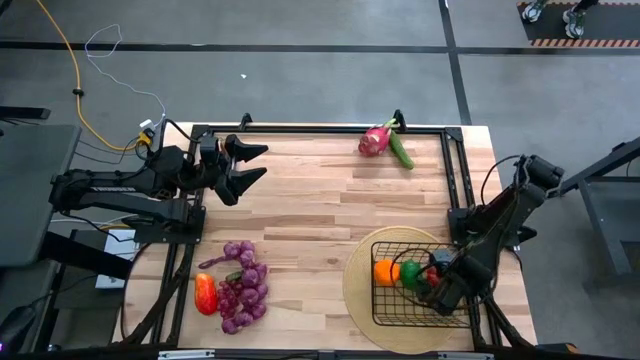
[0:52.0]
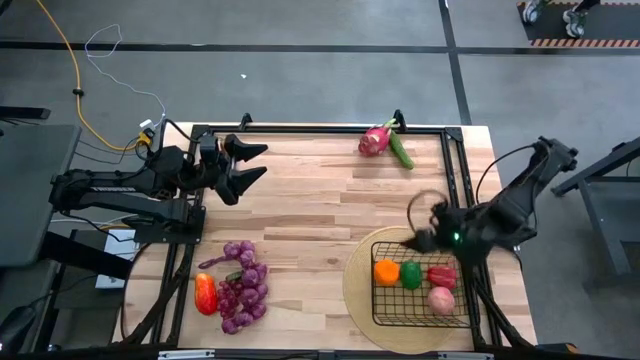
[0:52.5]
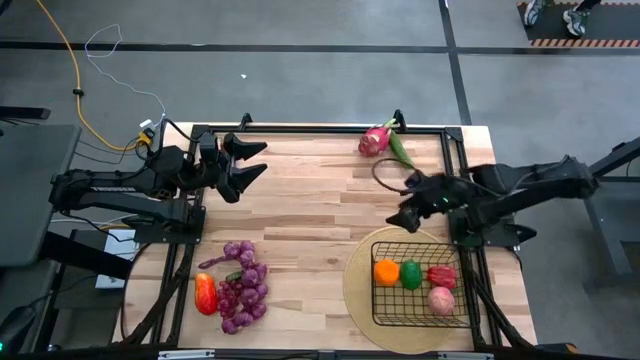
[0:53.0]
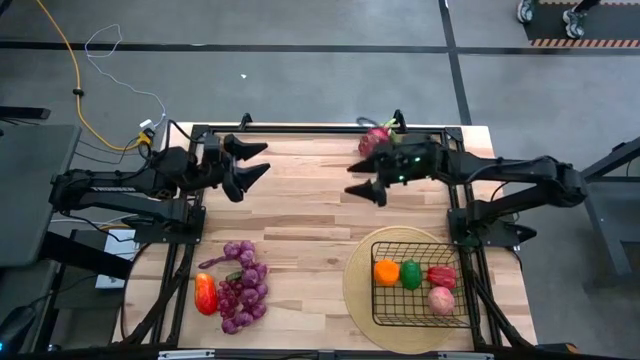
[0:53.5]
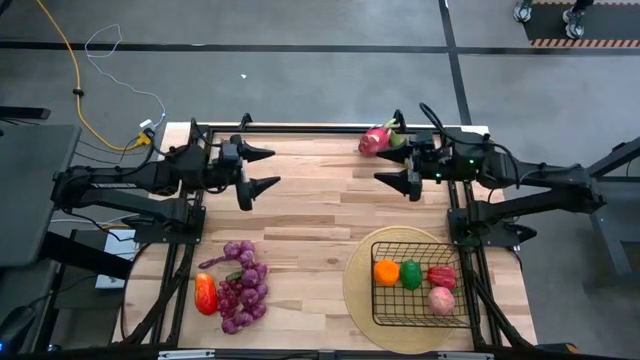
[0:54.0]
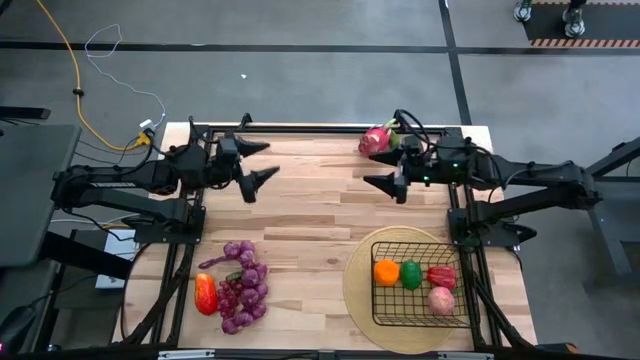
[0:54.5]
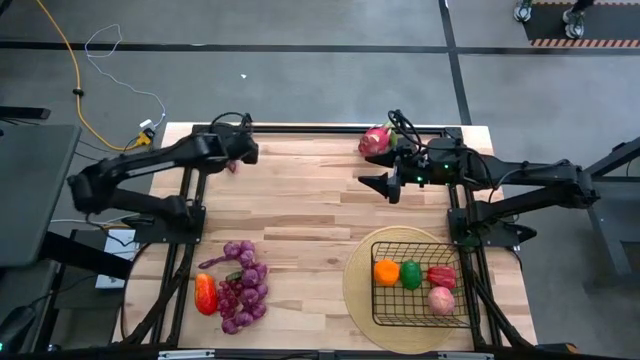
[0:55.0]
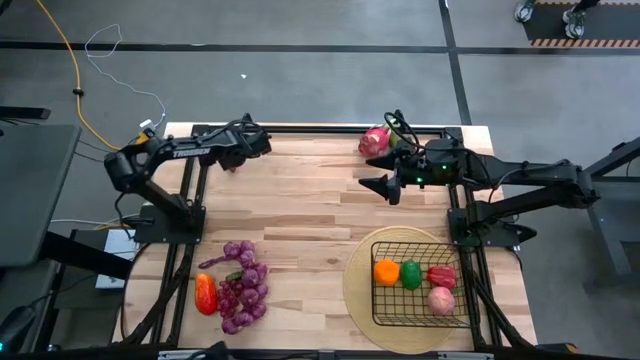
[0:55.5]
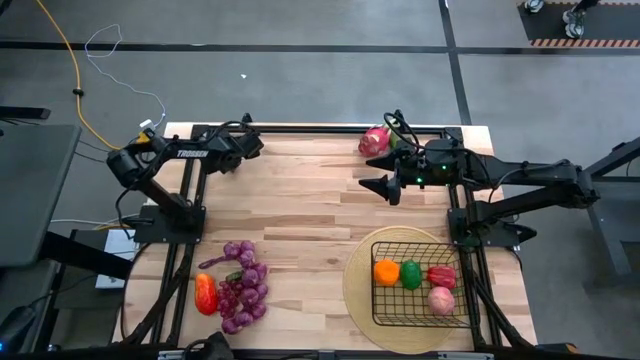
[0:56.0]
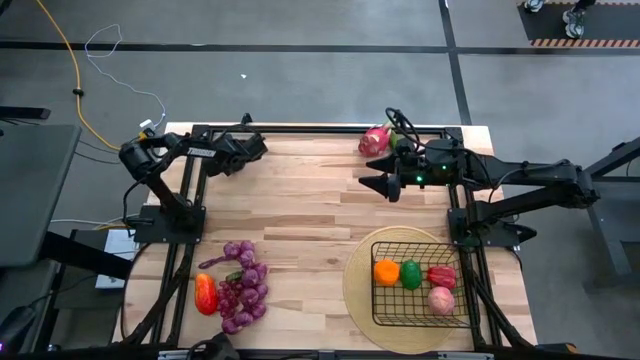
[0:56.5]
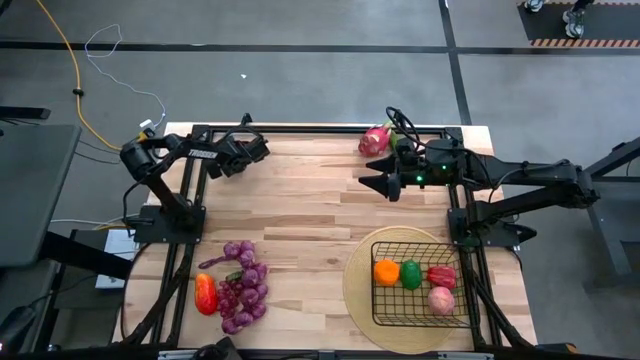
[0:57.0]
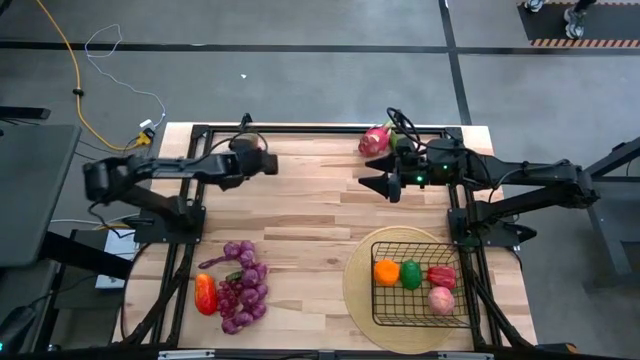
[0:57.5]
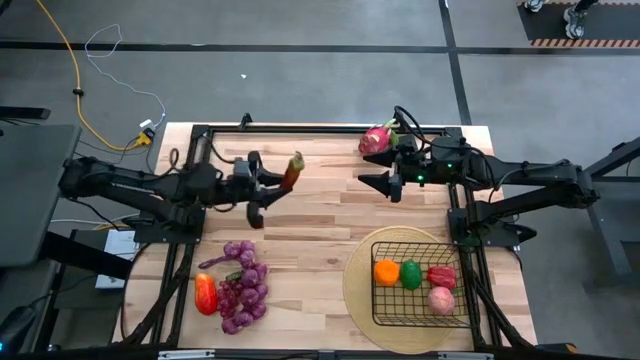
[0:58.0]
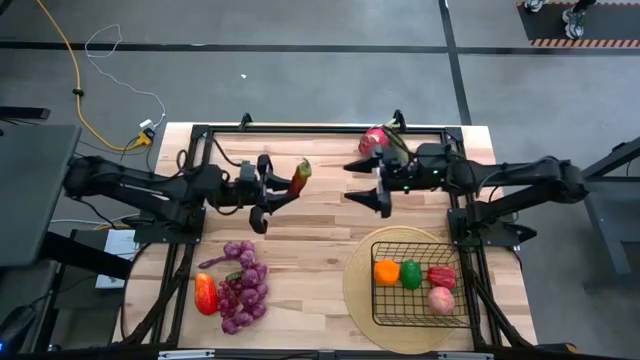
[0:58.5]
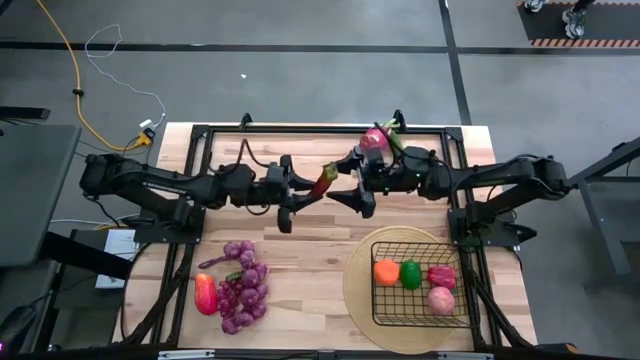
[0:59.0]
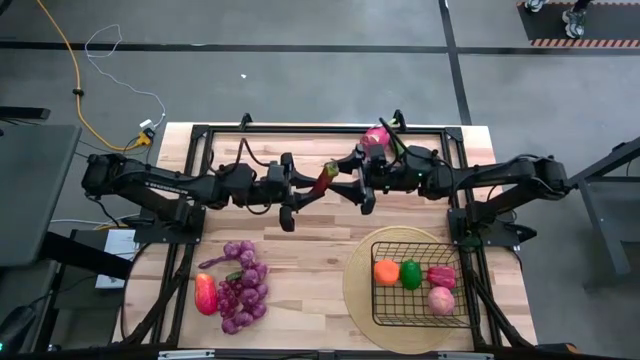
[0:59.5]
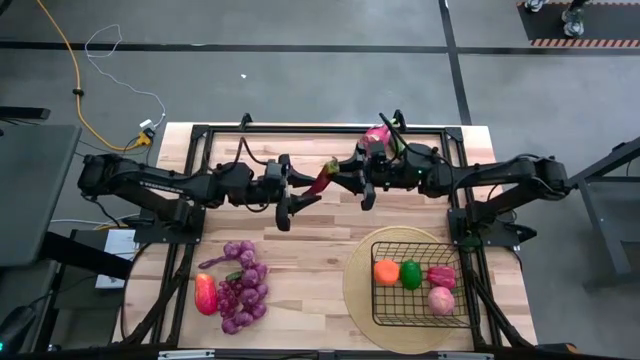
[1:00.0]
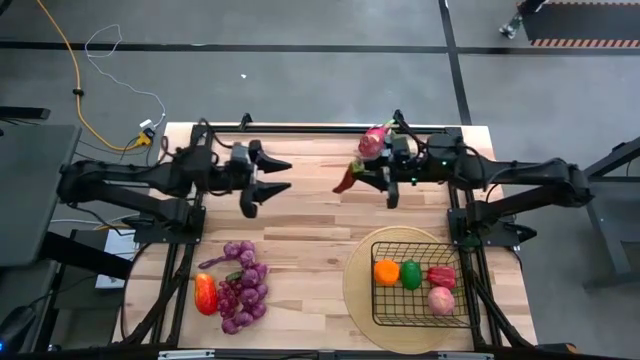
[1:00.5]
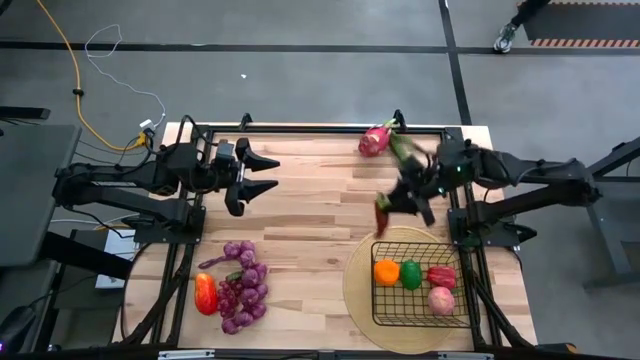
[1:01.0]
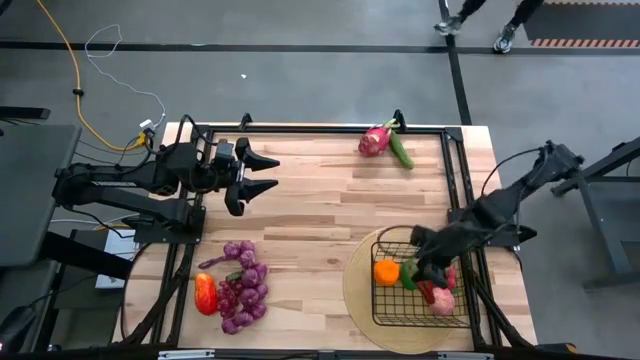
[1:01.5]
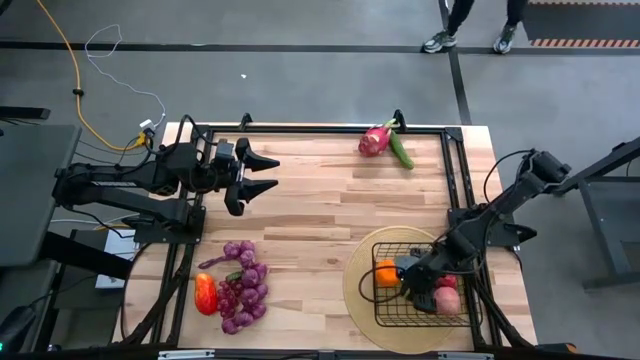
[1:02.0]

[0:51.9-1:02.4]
Task: Build produce basket
Put the chili pepper into the wire basket

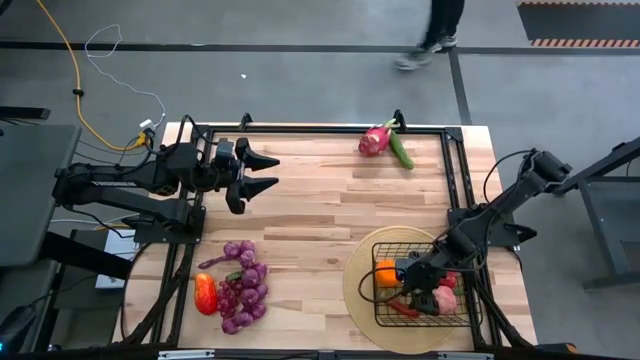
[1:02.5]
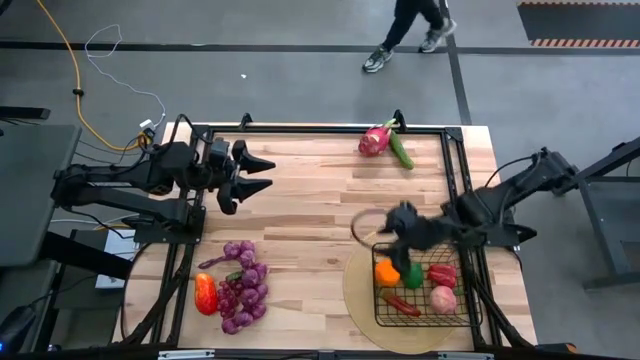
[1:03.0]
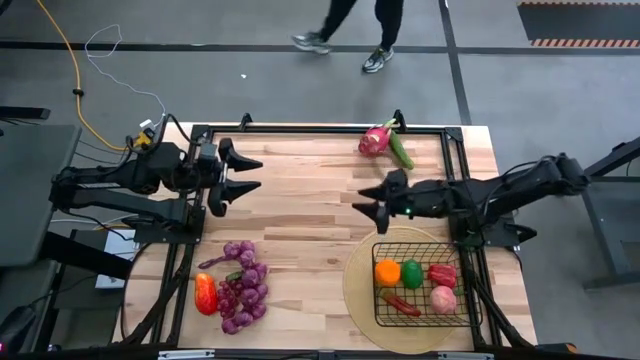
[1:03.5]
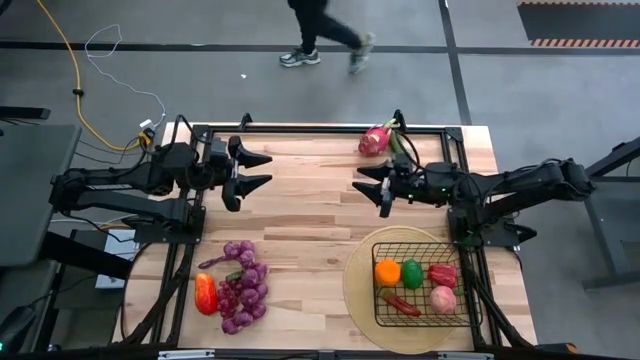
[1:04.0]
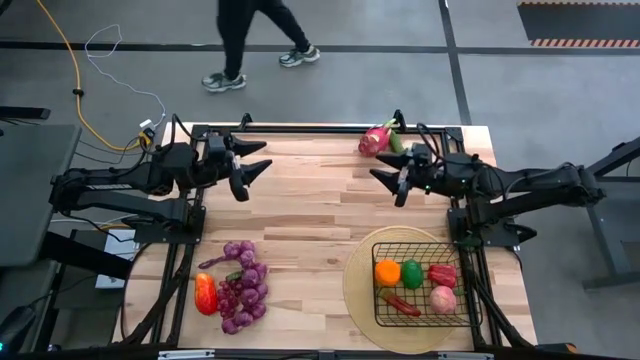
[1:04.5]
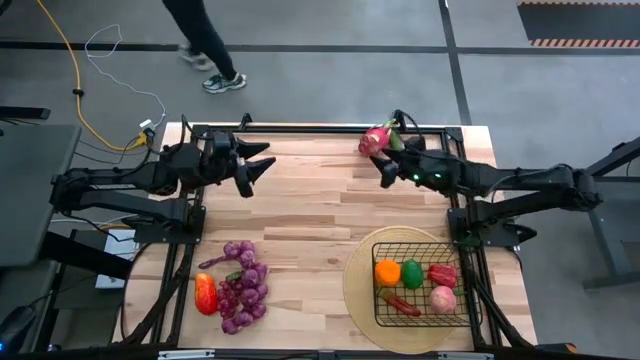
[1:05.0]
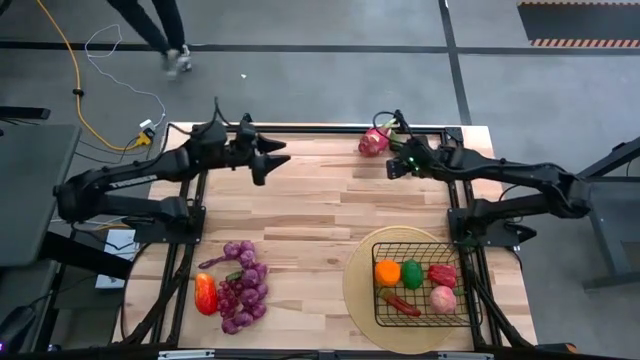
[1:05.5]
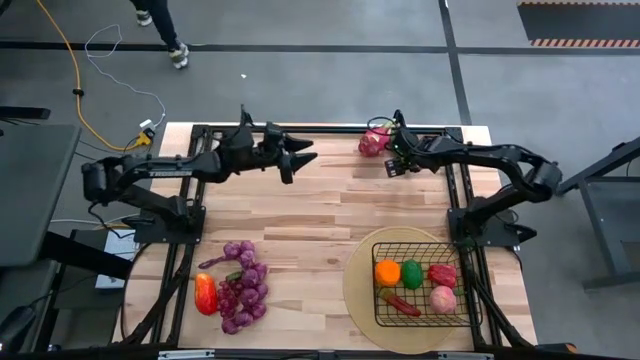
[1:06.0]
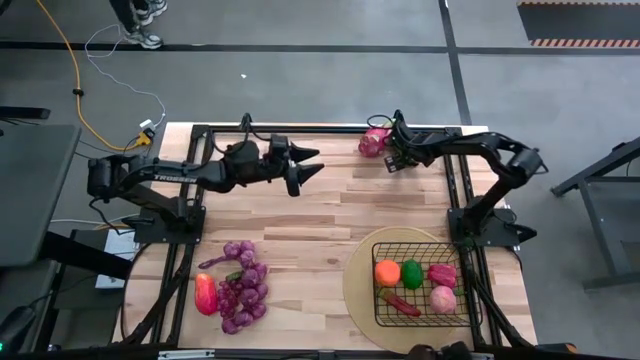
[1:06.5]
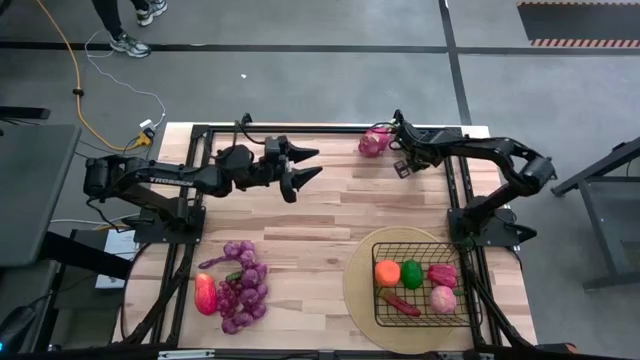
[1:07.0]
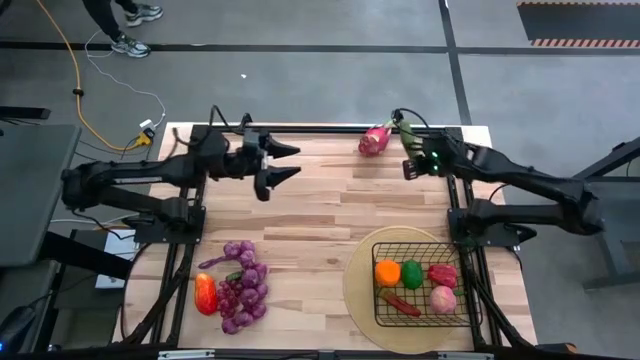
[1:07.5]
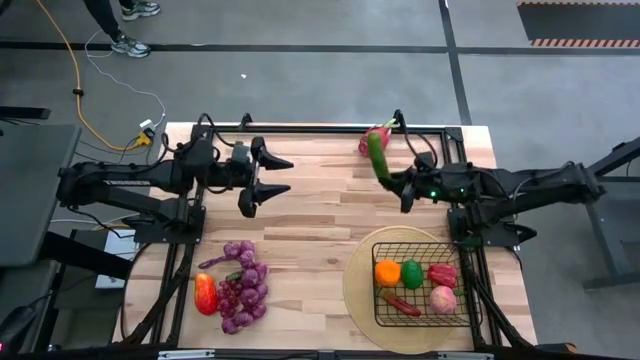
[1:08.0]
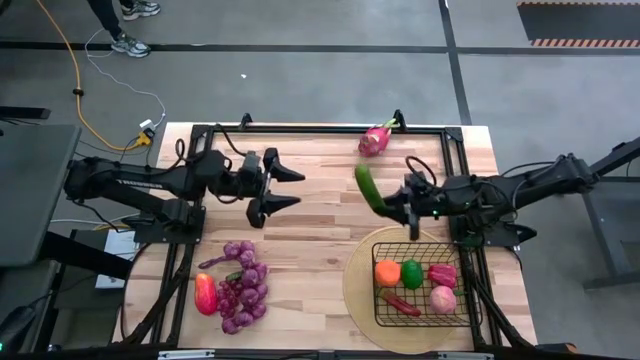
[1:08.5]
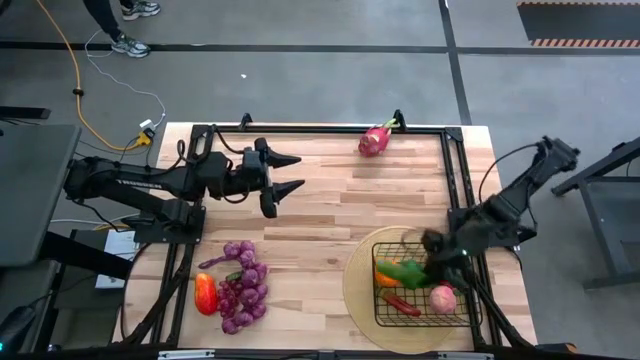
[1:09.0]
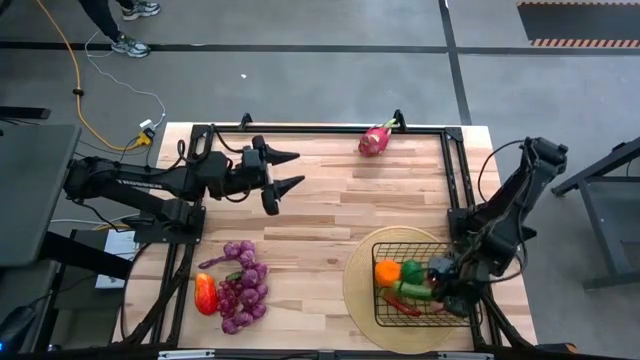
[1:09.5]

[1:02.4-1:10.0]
Put the cucumber into the wire basket

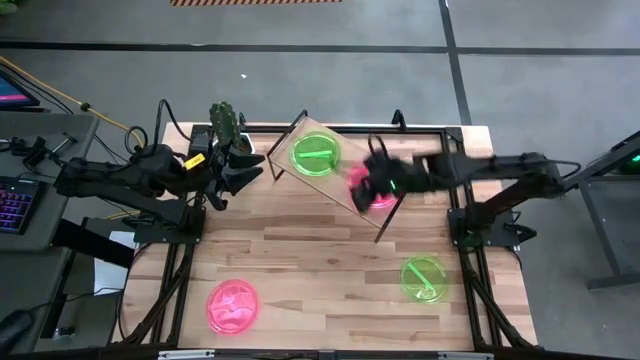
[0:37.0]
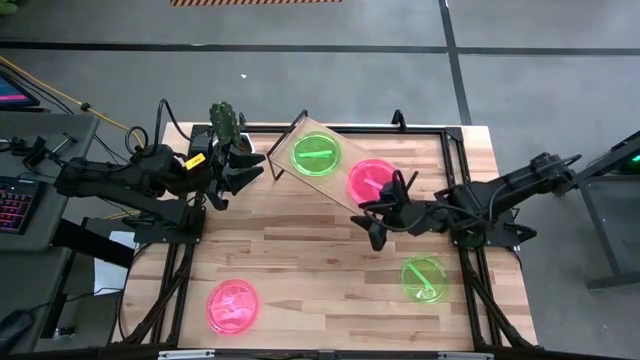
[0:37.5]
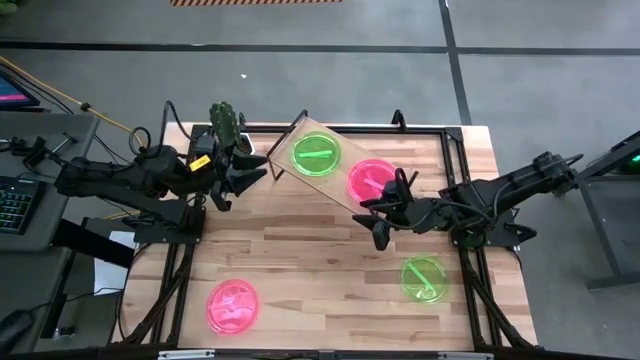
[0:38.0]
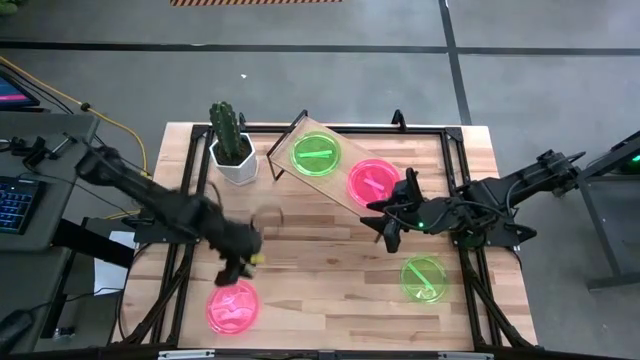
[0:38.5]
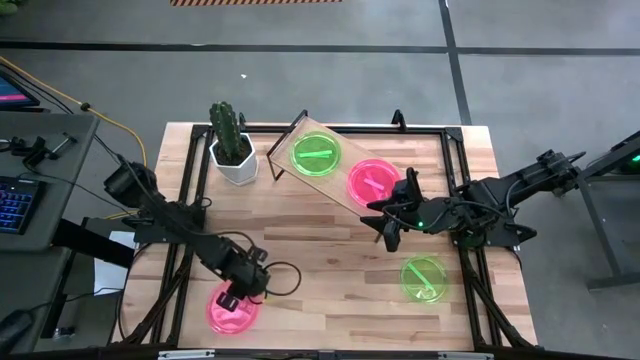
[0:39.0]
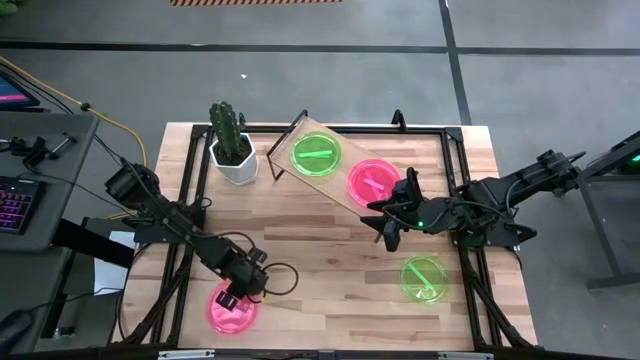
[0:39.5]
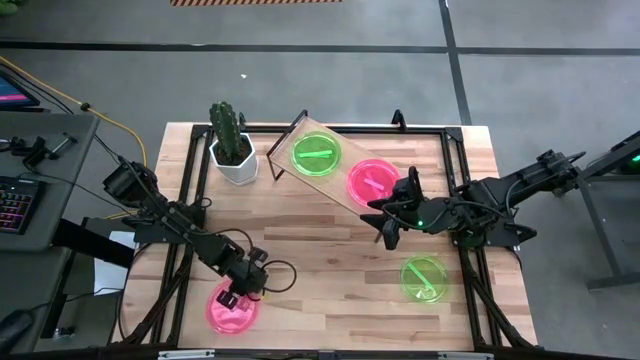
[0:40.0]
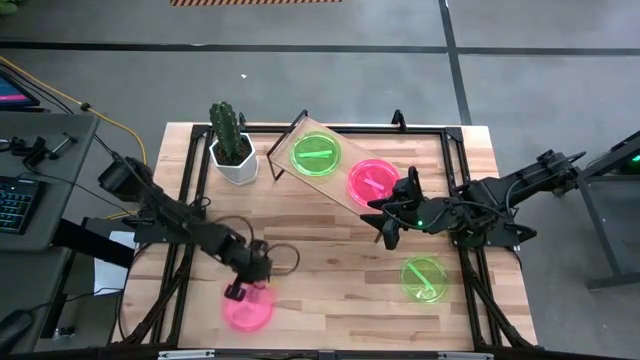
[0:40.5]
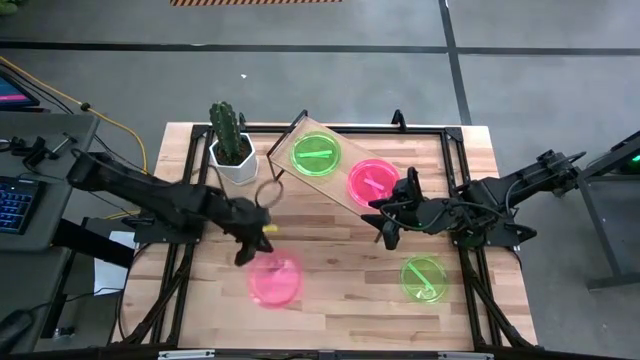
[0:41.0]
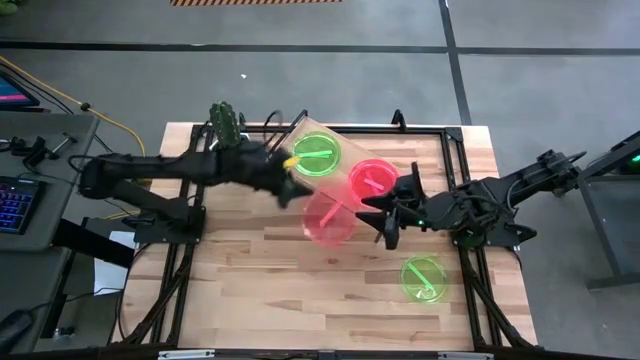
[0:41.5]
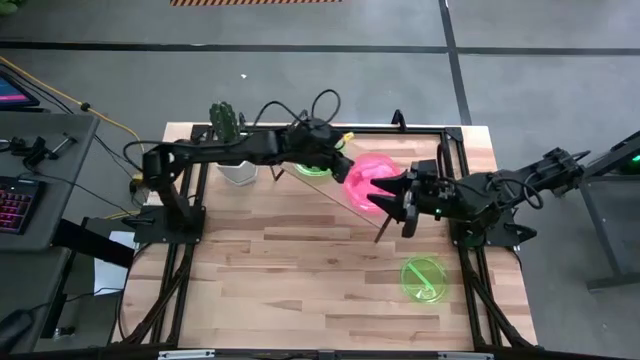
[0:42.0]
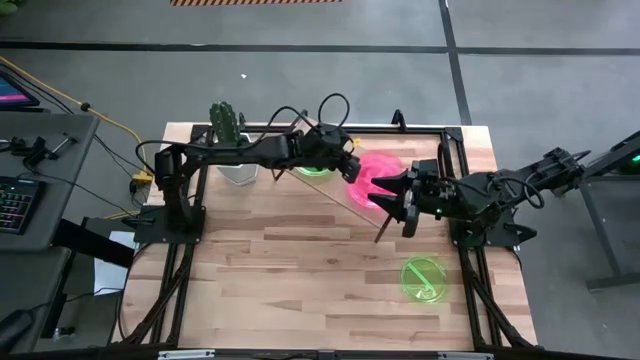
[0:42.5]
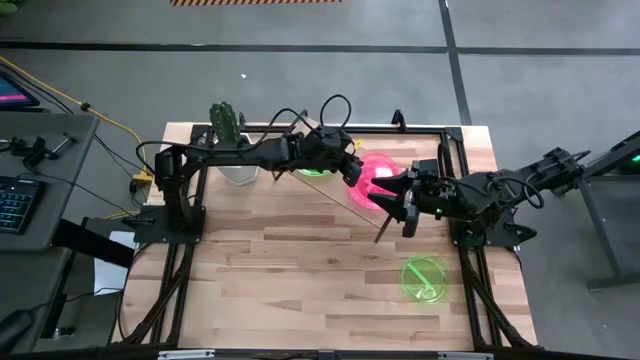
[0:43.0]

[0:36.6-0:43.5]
Task: Place and stack plates onto a shelf
Stack the light pink plate on top of the light pink plate on the shelf
